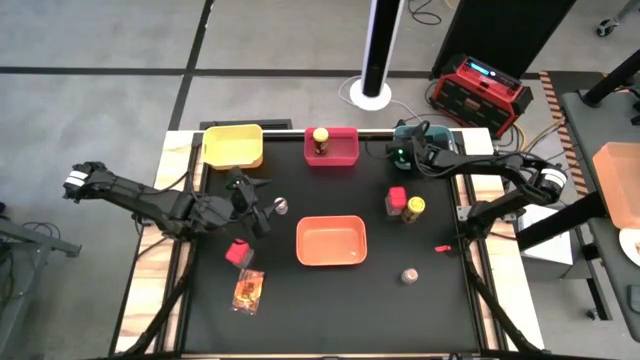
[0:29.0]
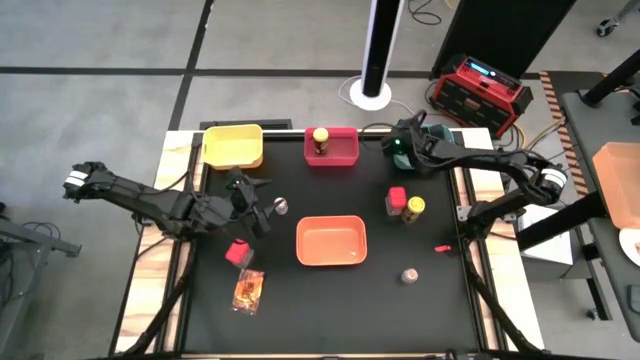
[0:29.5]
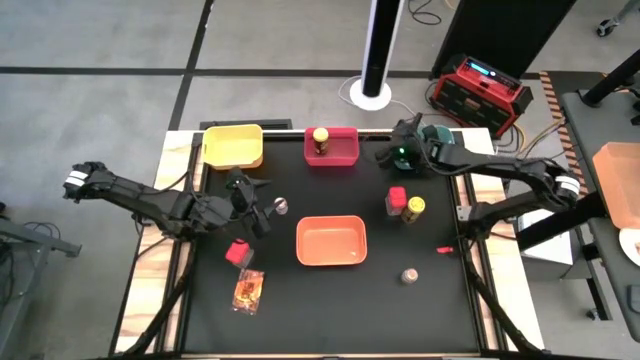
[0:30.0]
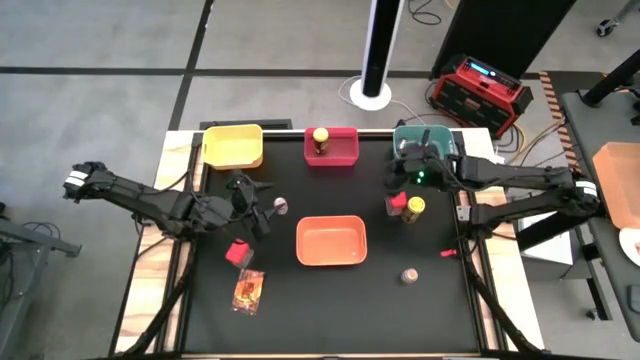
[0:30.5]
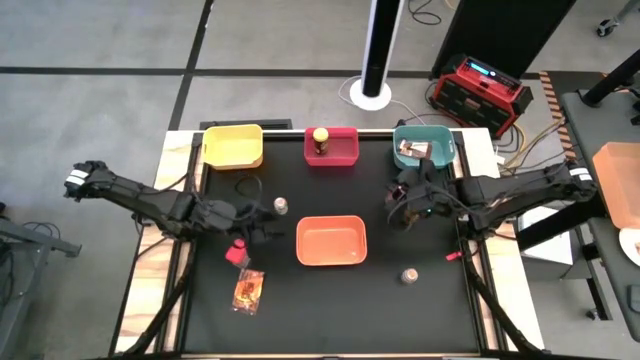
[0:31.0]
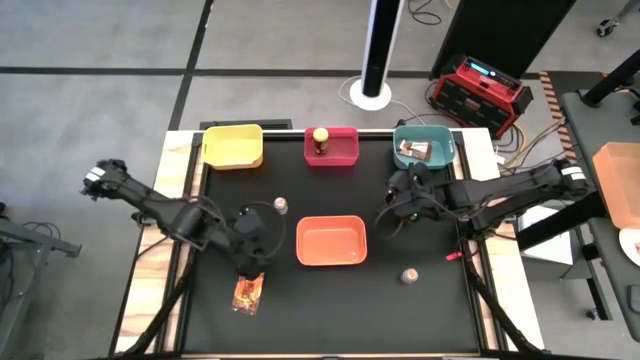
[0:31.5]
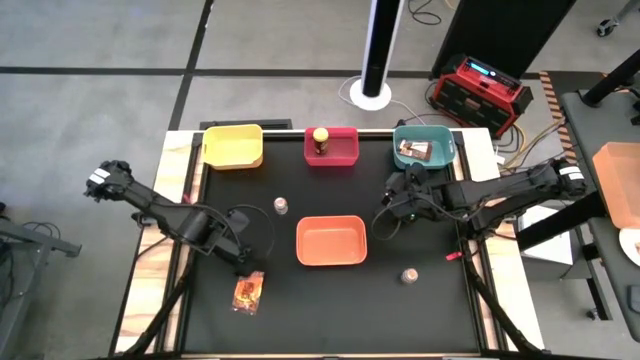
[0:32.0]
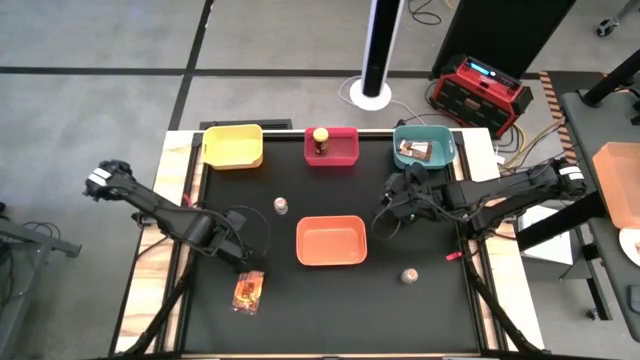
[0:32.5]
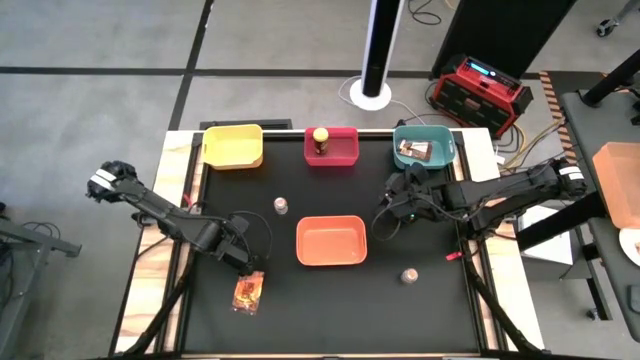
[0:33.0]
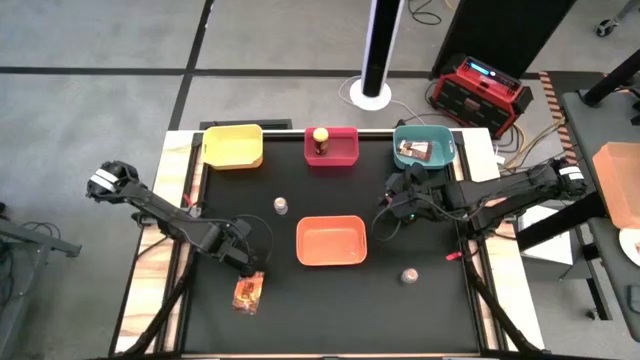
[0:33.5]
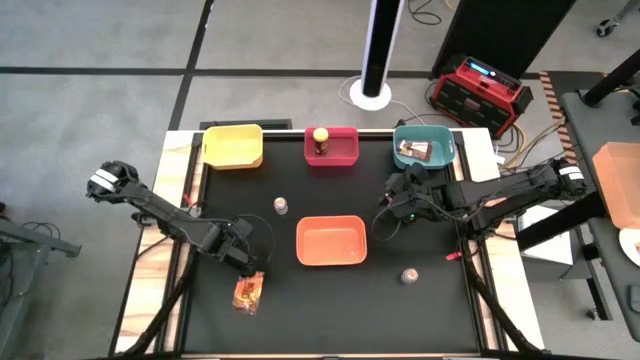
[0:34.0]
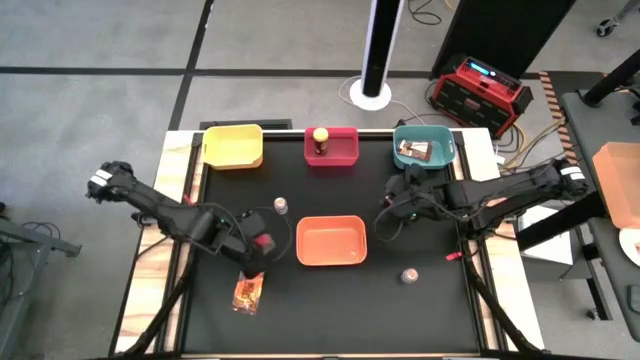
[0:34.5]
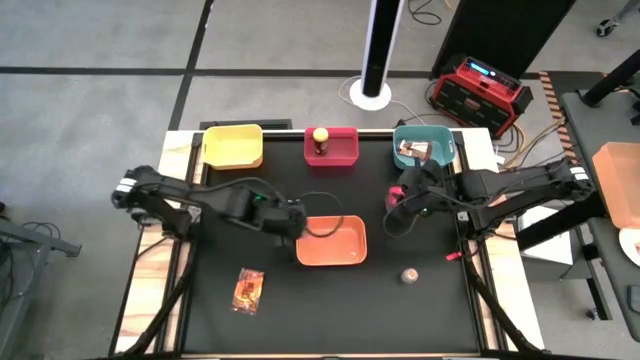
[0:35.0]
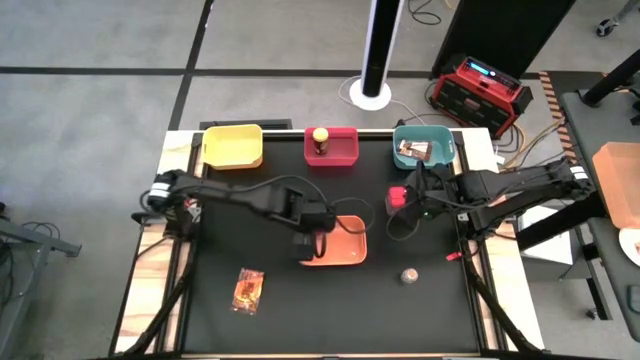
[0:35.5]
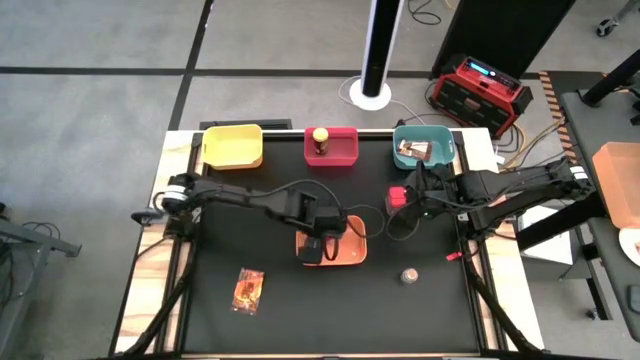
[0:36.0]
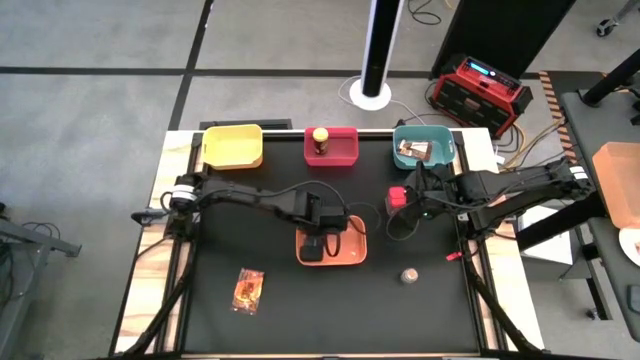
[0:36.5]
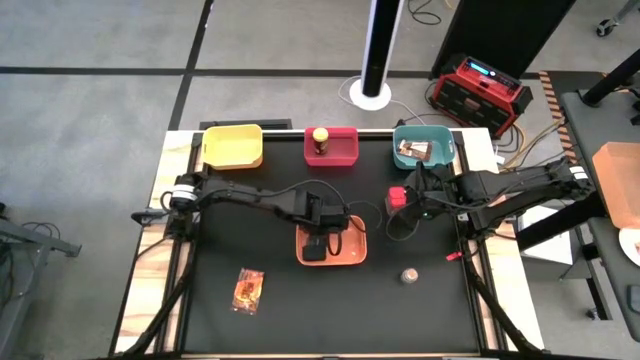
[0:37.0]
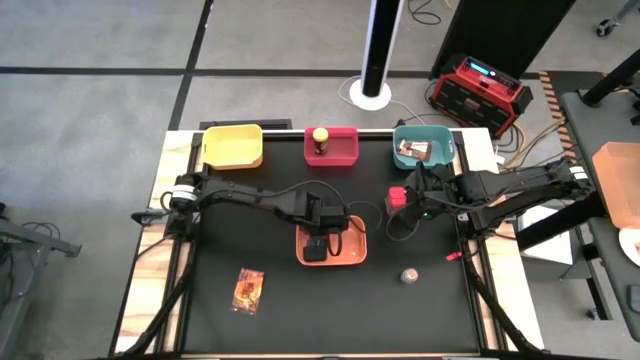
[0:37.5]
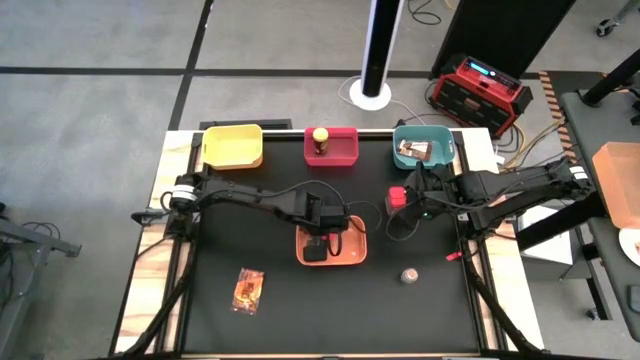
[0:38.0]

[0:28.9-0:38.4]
Task: Sort spices by type
Put the left red seasoning can into the orange bin

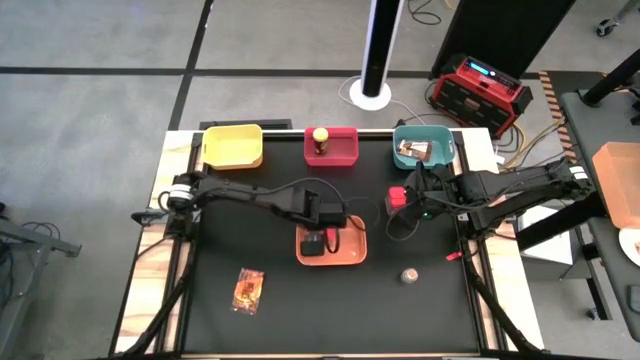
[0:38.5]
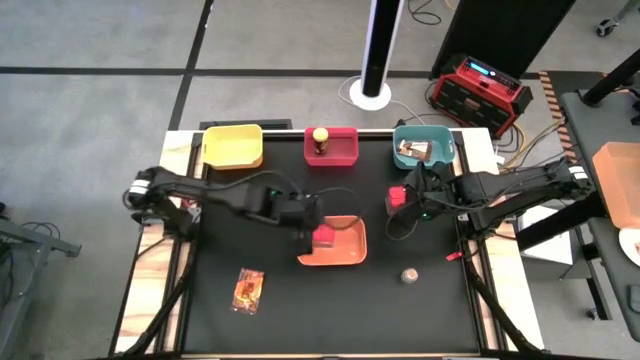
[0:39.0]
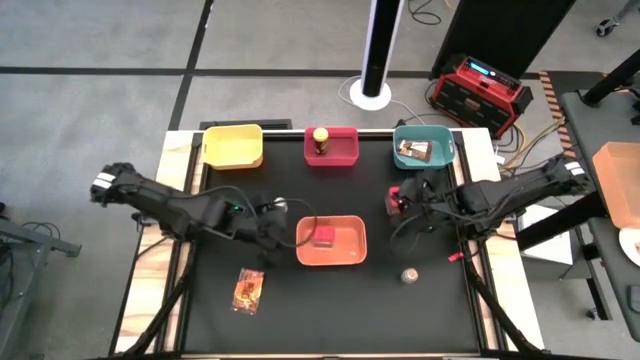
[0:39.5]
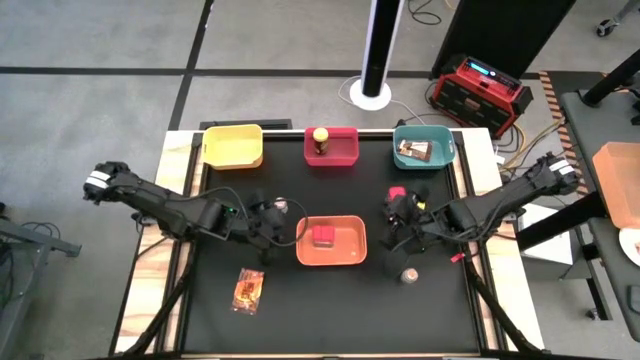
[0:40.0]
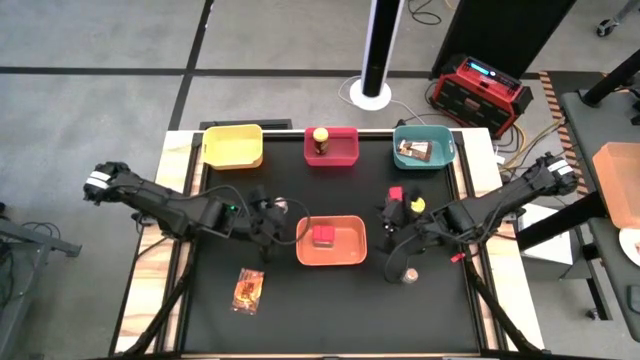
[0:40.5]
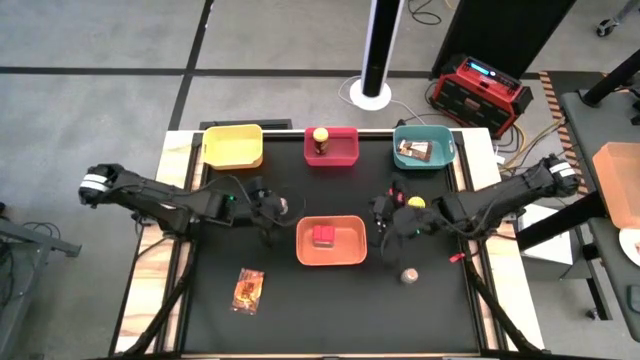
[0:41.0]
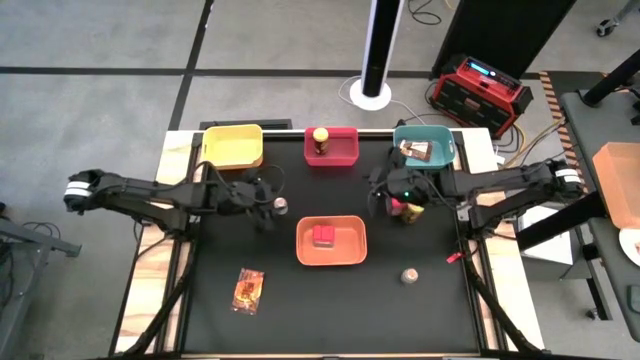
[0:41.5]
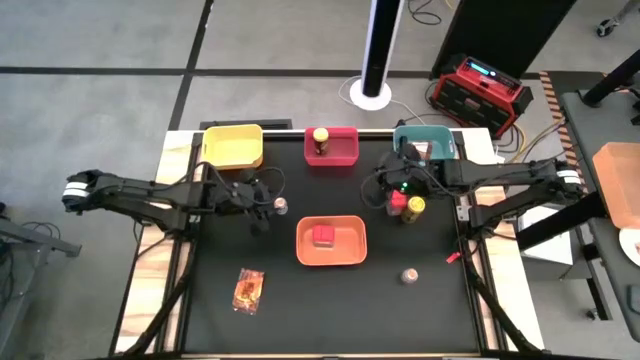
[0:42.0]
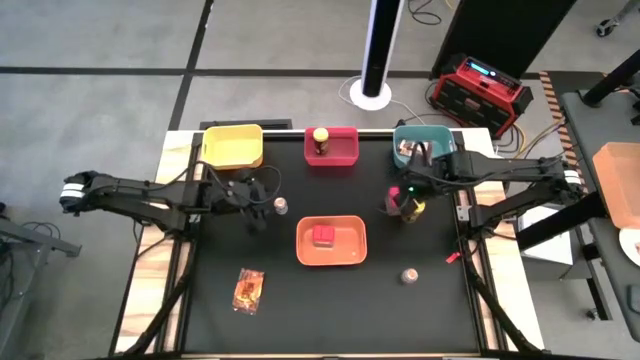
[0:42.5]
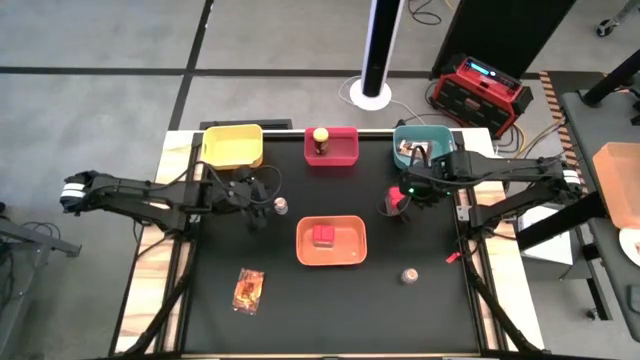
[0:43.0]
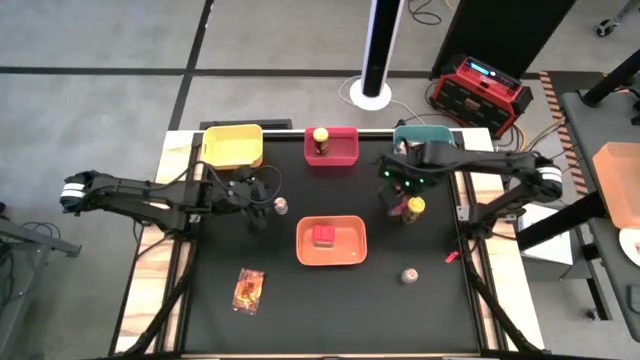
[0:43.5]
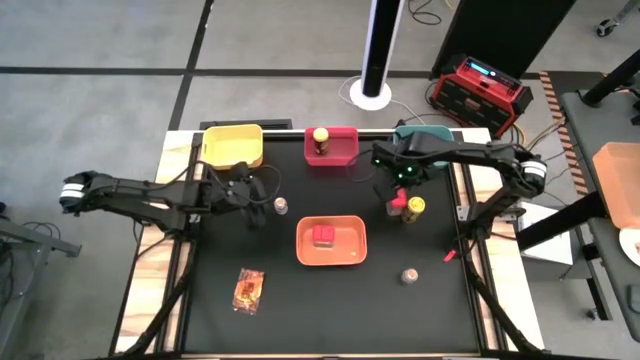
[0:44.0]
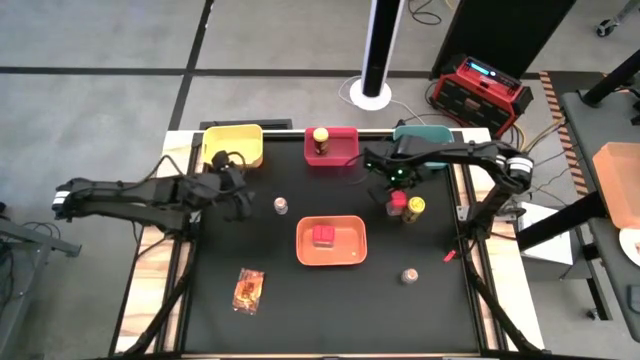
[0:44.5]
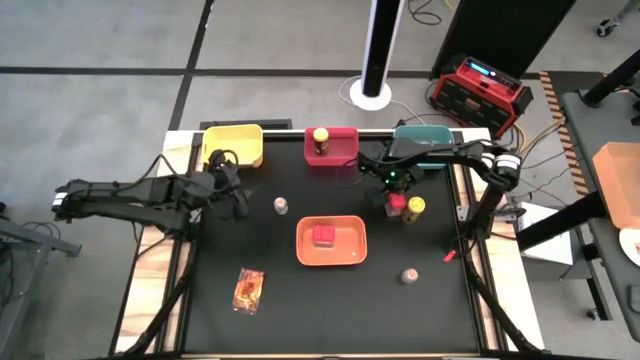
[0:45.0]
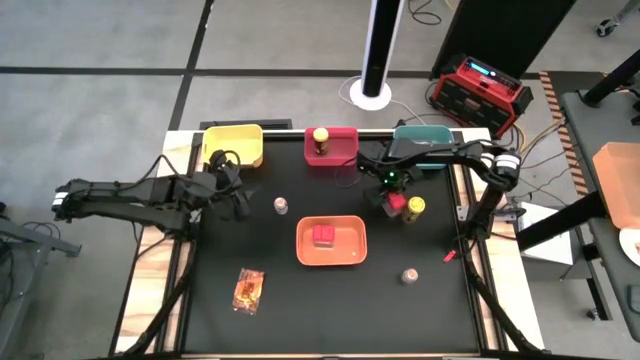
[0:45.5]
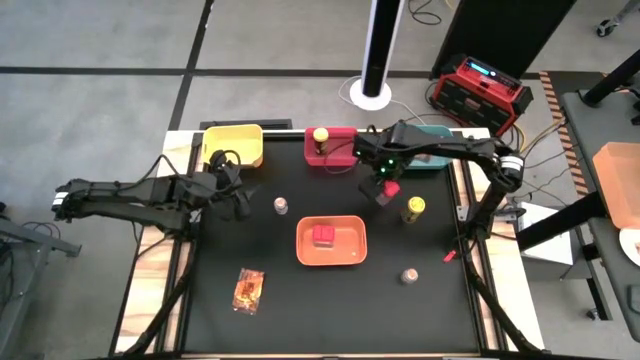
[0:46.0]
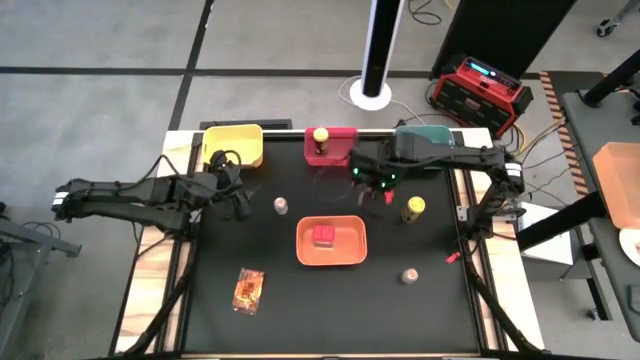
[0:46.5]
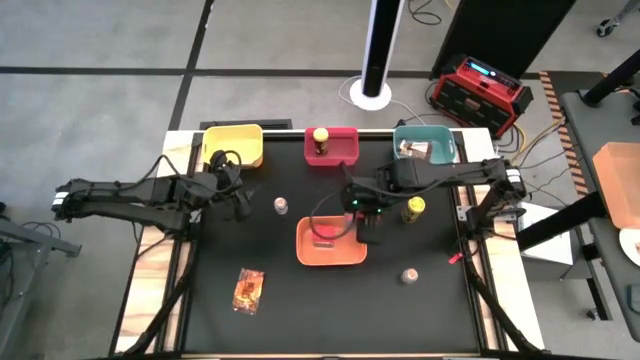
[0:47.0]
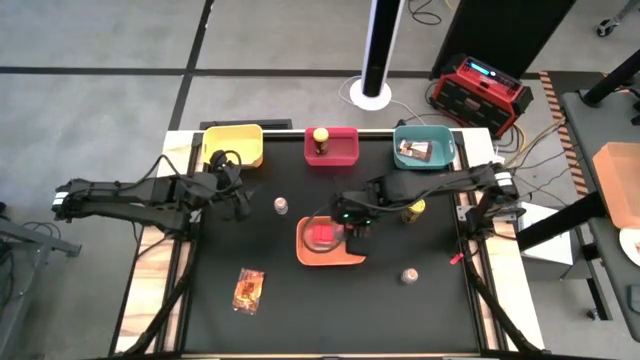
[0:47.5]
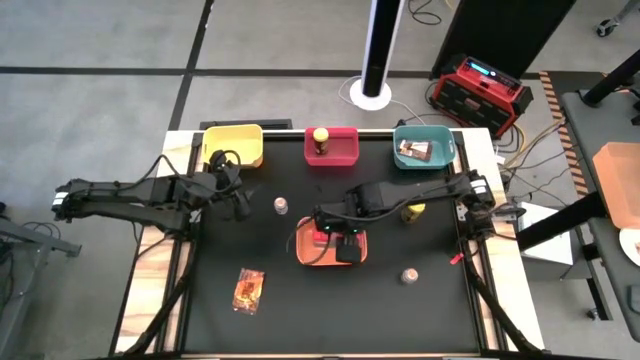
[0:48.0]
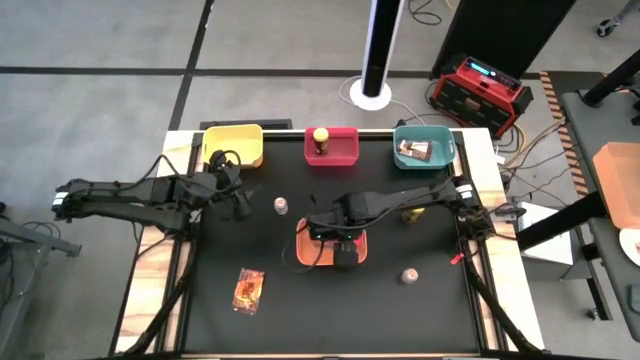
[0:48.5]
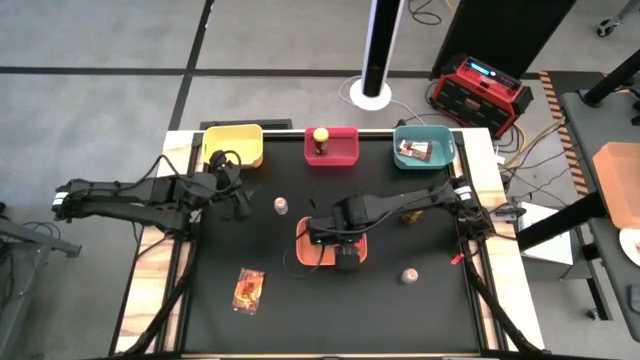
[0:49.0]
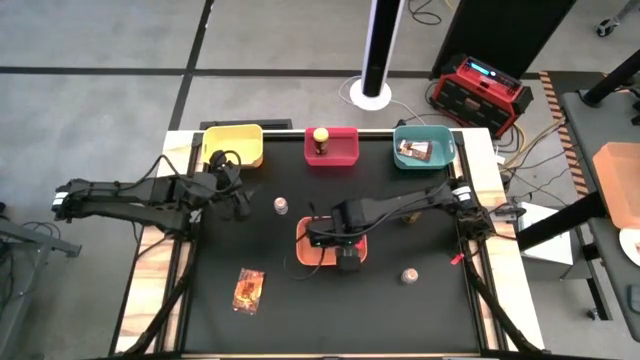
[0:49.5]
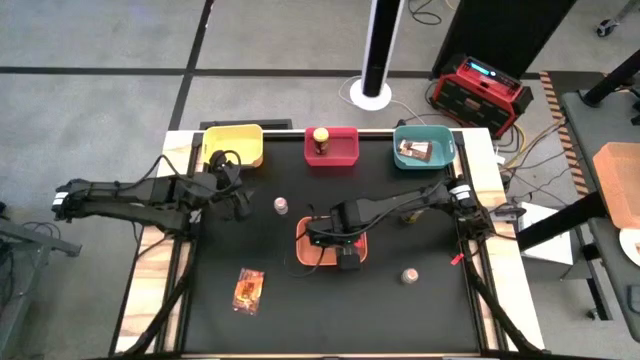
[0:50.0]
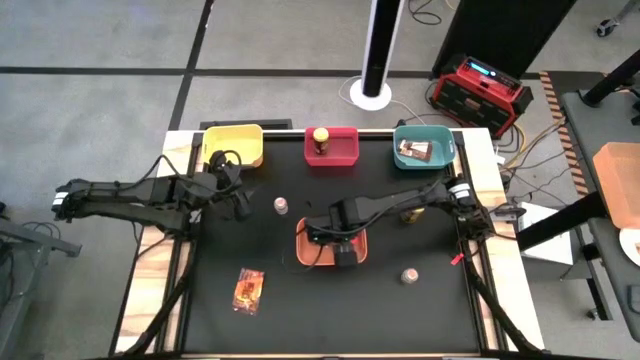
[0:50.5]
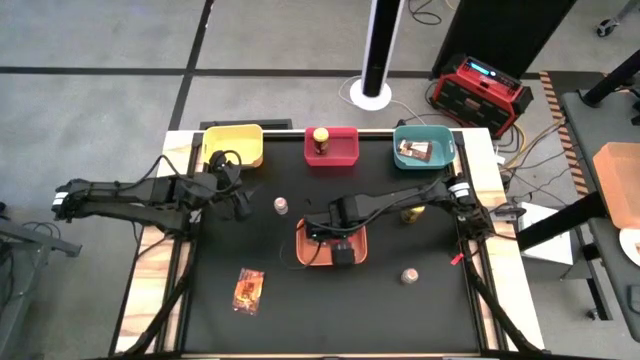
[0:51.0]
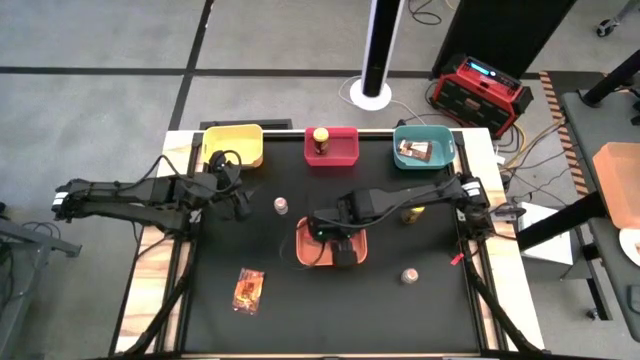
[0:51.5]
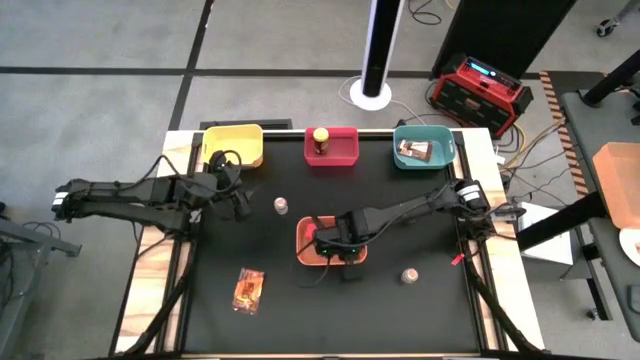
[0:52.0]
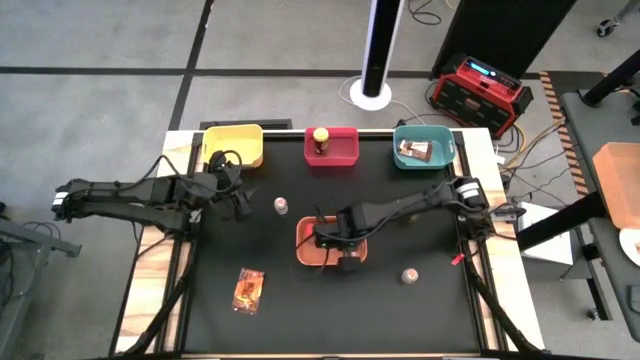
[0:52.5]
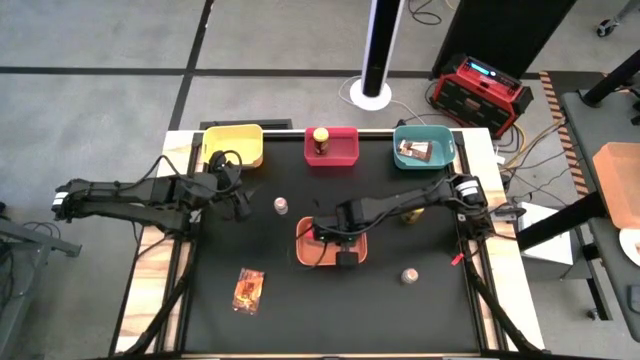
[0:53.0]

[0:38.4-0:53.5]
Put the red seasoning can into the orange bin
